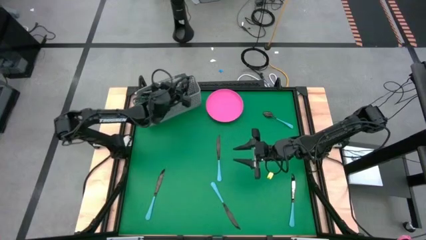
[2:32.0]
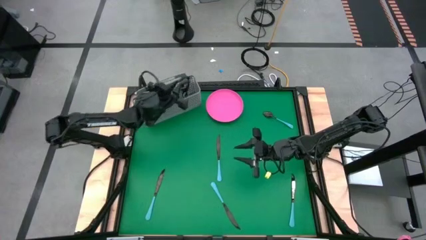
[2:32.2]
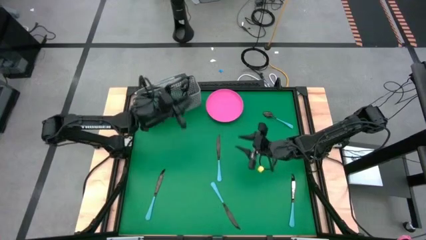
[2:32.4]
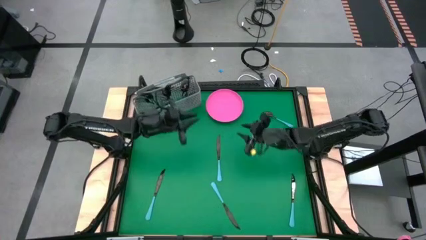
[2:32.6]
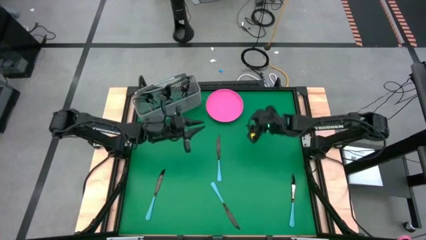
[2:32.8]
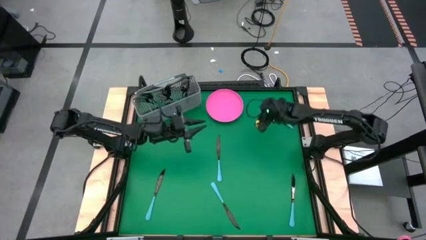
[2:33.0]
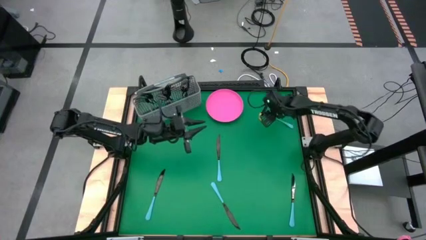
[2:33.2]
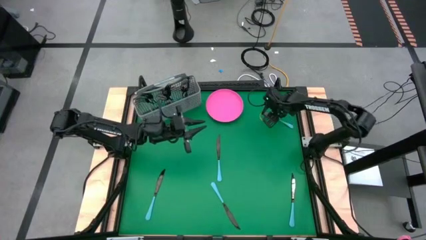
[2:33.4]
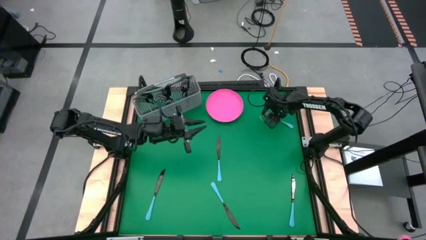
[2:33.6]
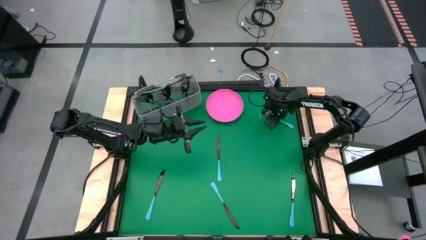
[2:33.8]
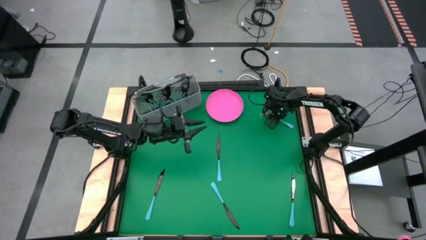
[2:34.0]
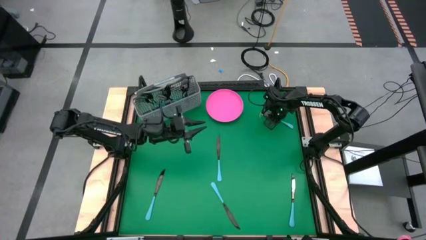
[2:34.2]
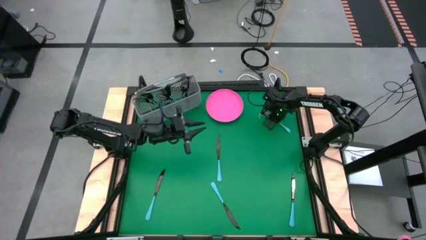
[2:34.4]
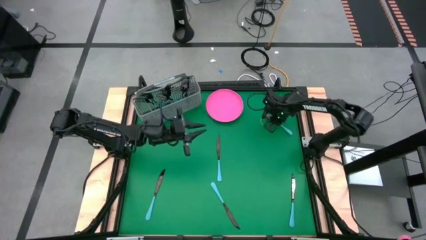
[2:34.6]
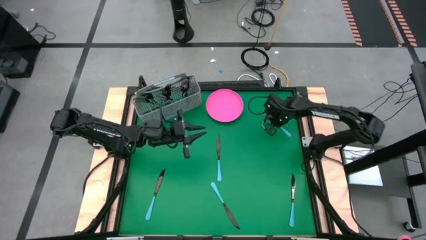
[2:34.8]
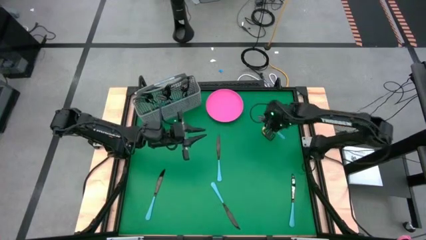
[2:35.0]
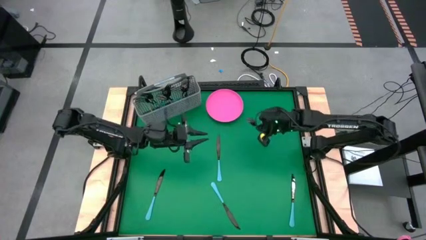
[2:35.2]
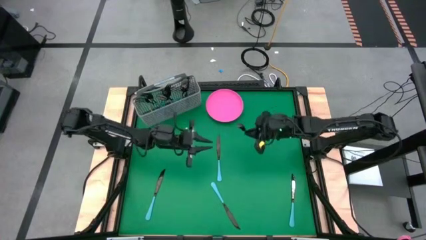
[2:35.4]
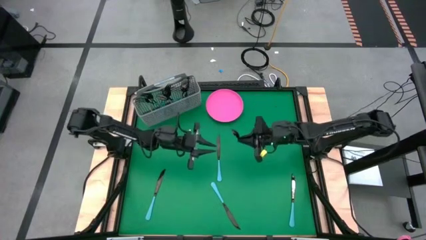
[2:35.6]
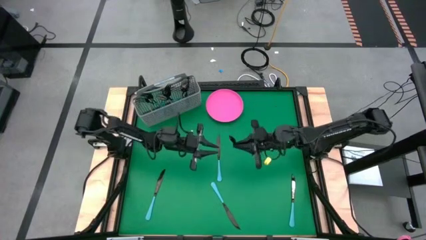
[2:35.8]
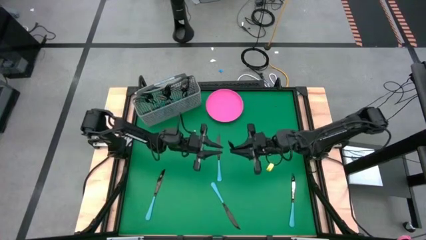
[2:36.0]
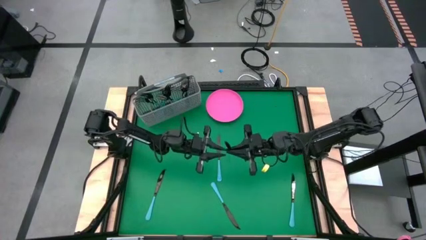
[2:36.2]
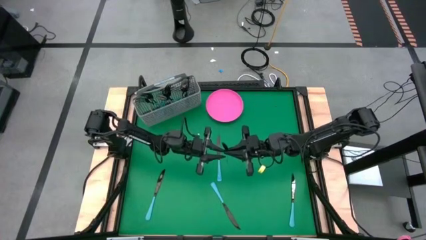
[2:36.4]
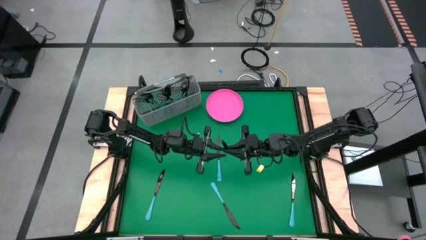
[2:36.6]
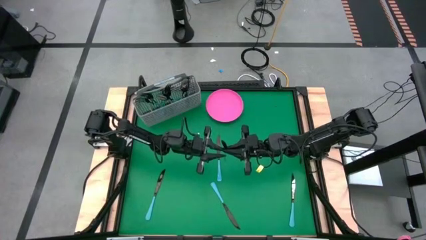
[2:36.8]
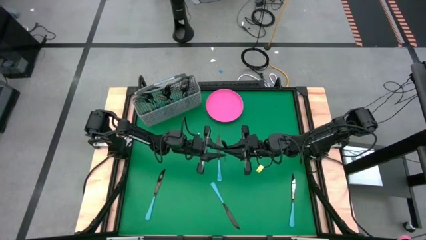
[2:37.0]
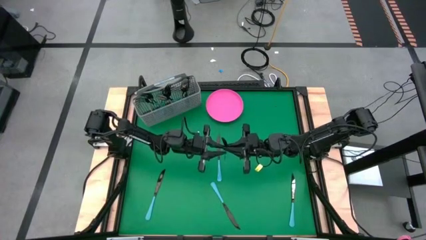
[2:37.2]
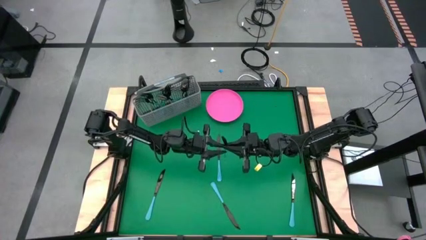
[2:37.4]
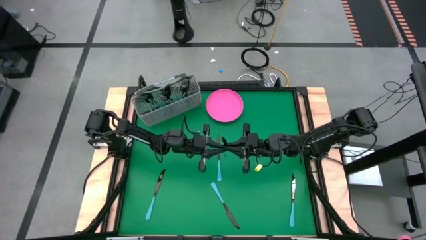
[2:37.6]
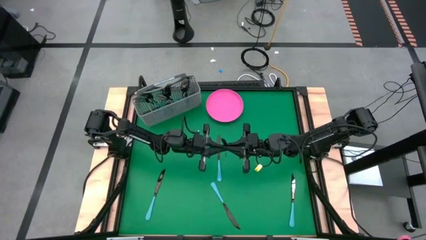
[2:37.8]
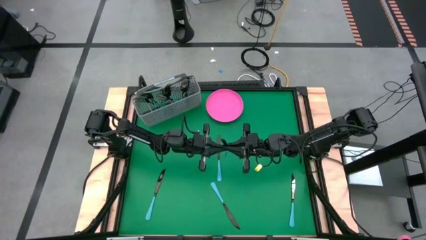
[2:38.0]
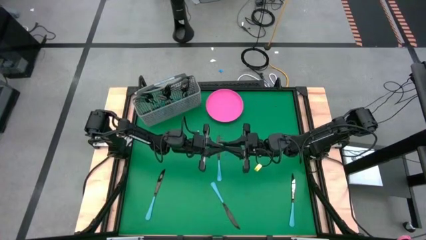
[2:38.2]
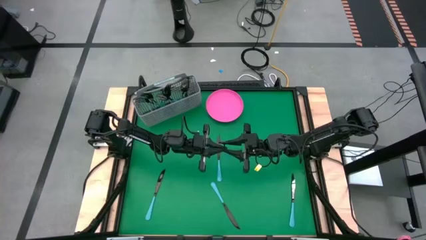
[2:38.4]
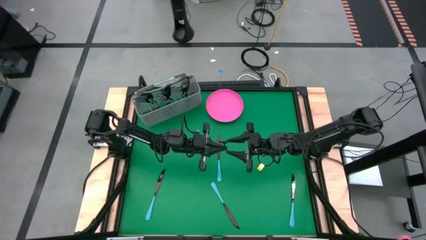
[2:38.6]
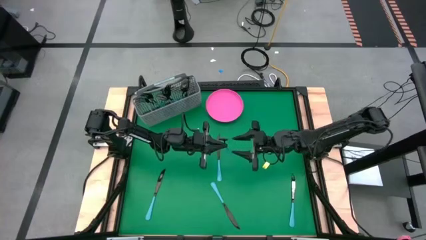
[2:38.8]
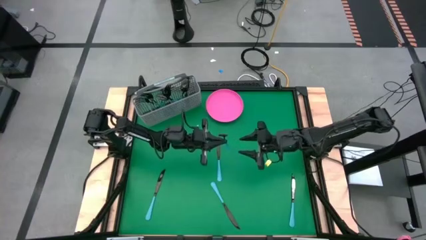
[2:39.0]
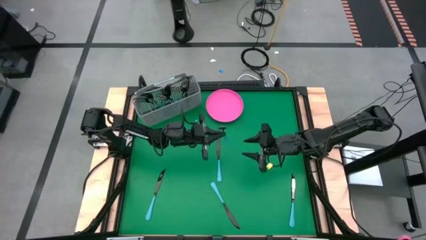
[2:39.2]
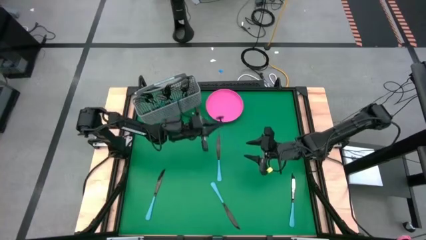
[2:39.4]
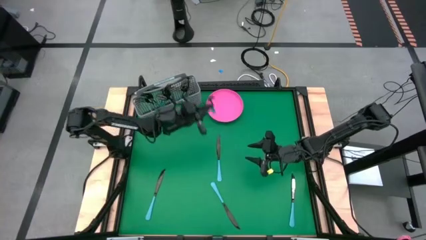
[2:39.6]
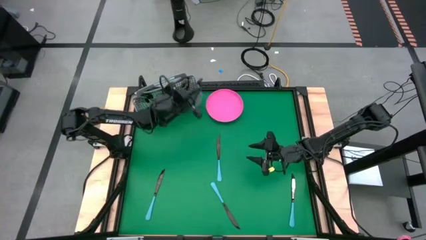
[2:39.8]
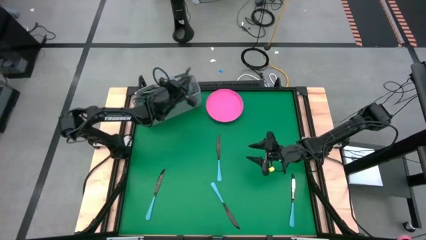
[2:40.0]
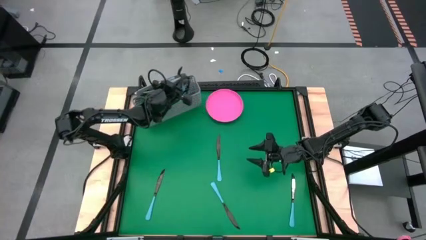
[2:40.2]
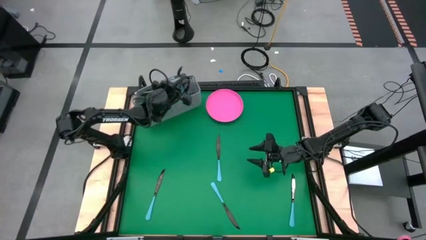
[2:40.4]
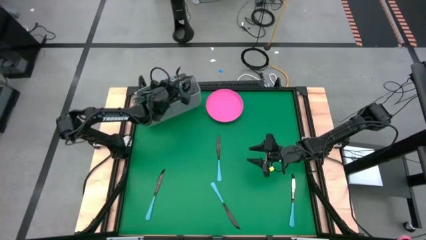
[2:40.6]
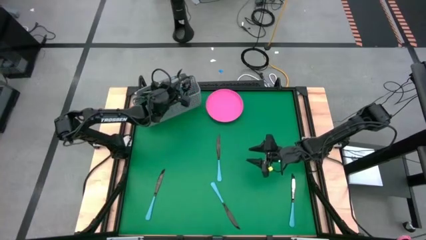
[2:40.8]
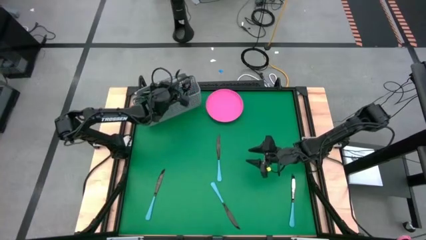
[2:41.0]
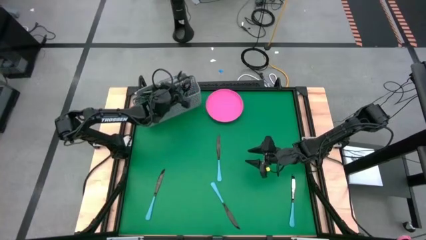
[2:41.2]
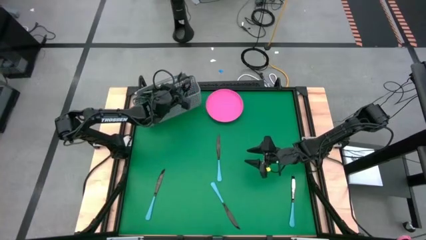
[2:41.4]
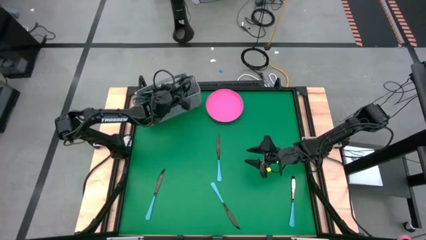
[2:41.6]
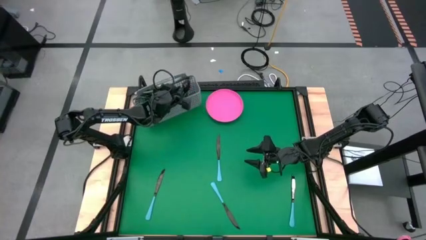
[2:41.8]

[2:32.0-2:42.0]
Task: Sort silverware
Put the blue spoon into the gray silverware holder

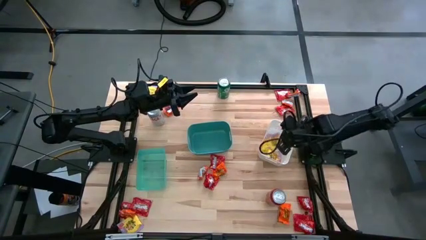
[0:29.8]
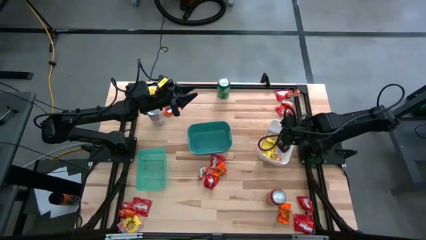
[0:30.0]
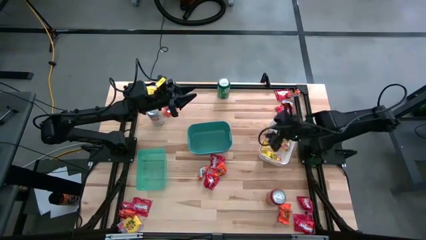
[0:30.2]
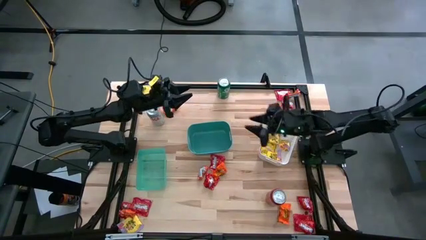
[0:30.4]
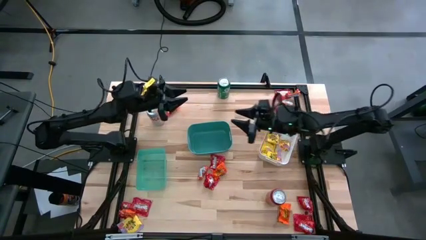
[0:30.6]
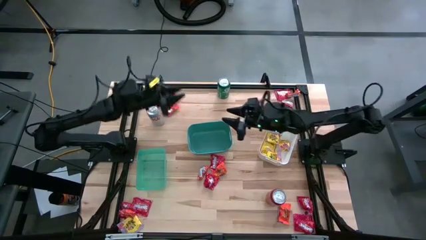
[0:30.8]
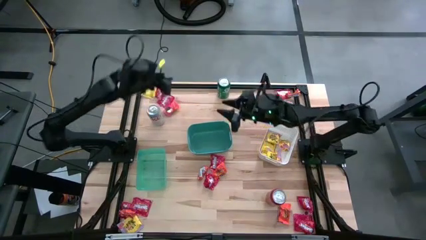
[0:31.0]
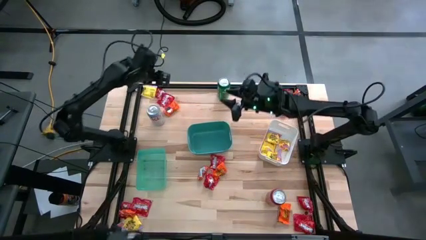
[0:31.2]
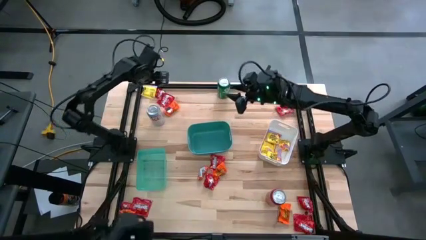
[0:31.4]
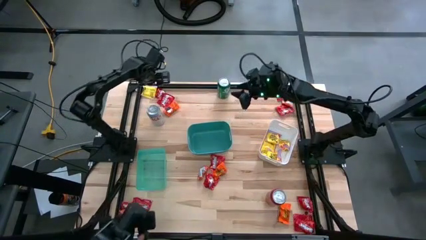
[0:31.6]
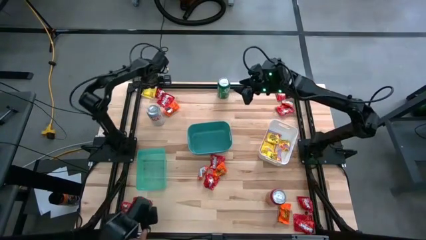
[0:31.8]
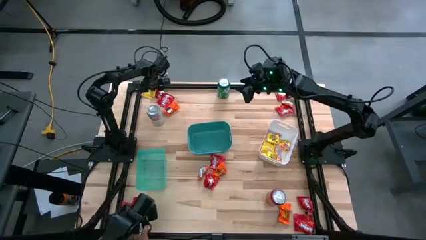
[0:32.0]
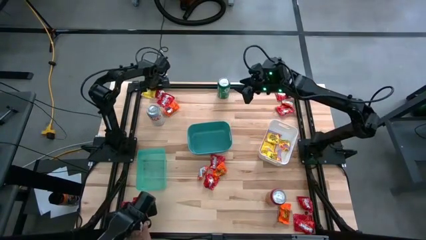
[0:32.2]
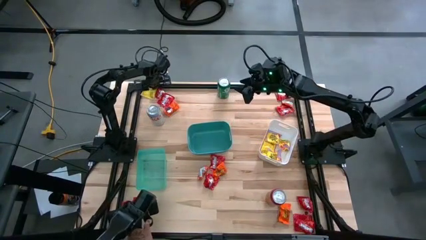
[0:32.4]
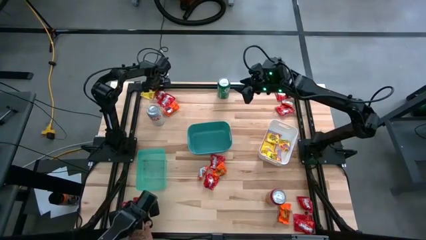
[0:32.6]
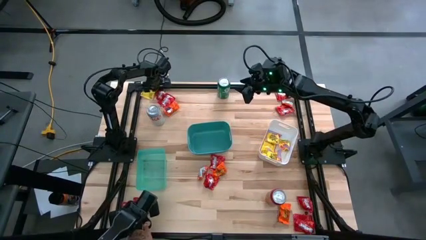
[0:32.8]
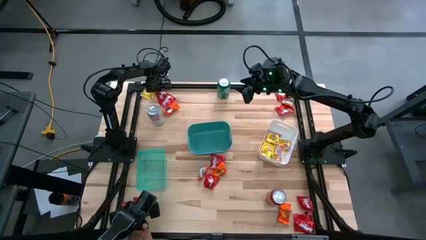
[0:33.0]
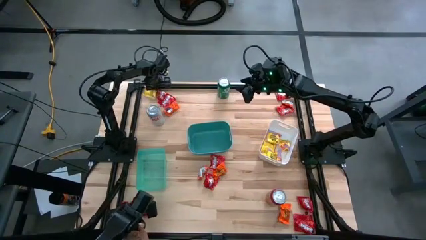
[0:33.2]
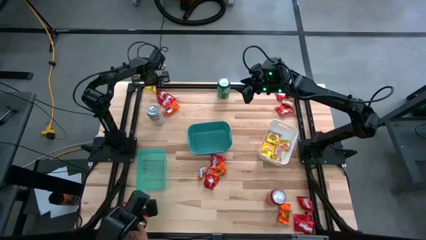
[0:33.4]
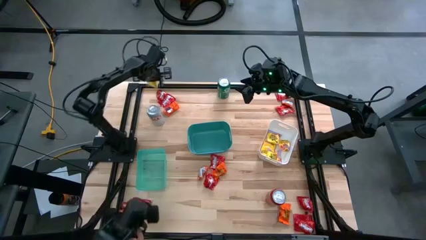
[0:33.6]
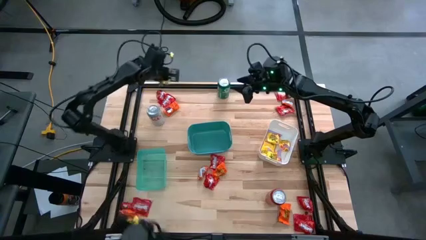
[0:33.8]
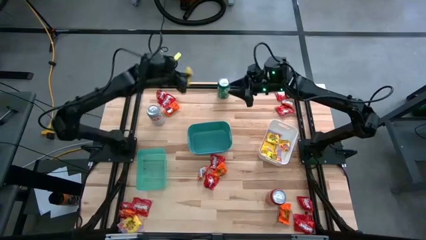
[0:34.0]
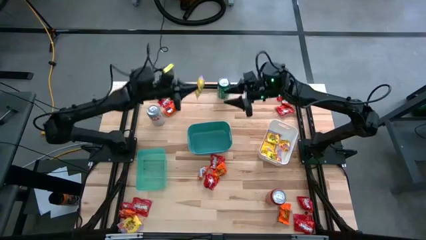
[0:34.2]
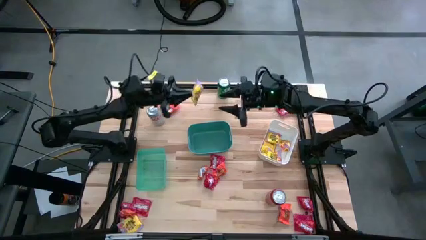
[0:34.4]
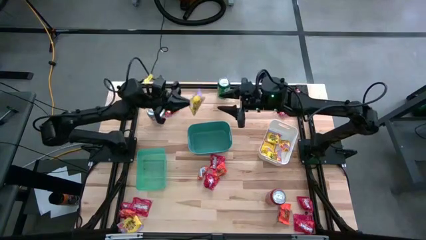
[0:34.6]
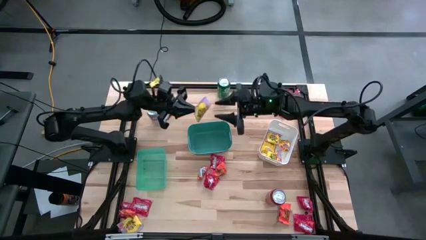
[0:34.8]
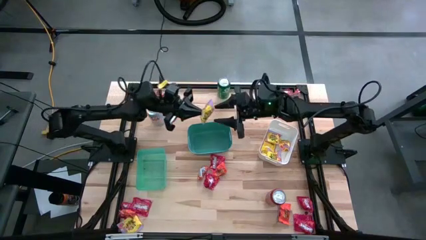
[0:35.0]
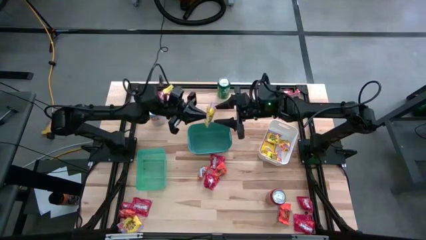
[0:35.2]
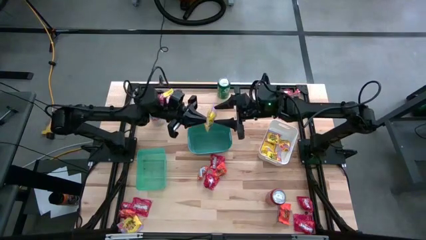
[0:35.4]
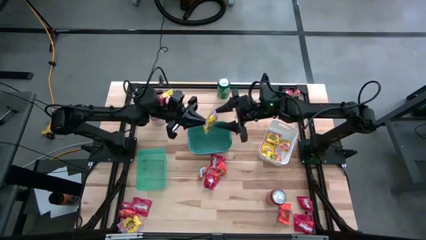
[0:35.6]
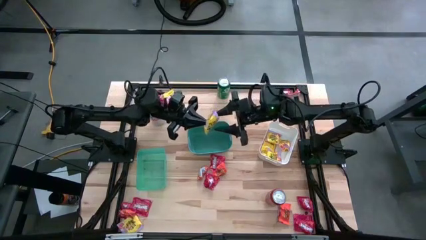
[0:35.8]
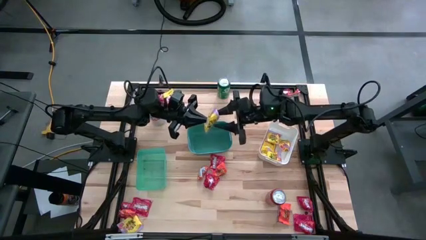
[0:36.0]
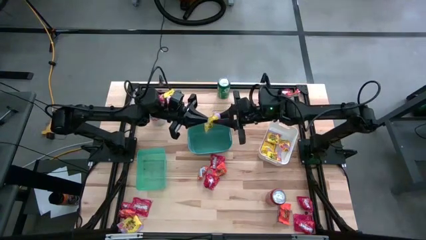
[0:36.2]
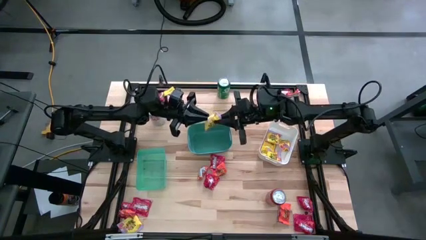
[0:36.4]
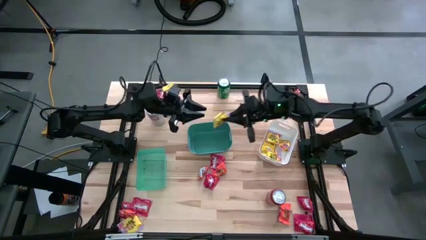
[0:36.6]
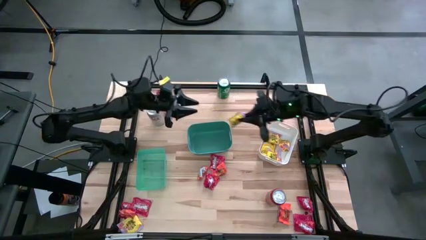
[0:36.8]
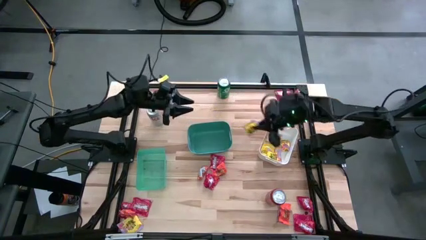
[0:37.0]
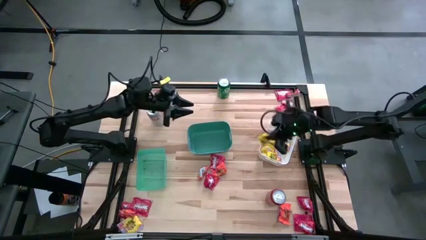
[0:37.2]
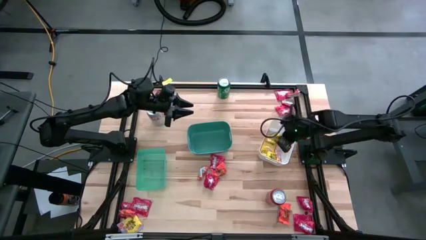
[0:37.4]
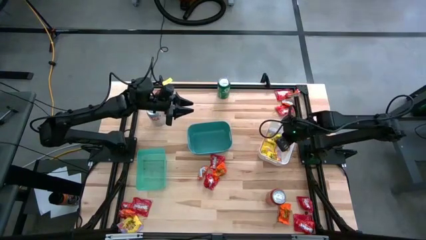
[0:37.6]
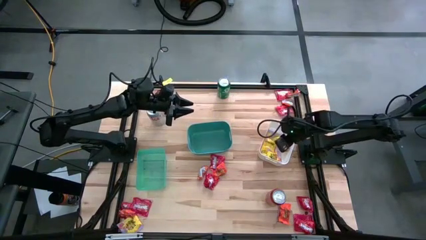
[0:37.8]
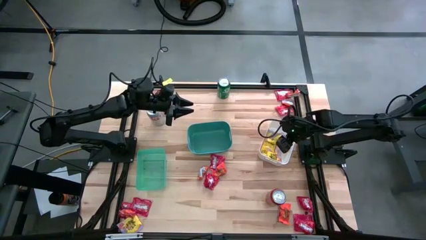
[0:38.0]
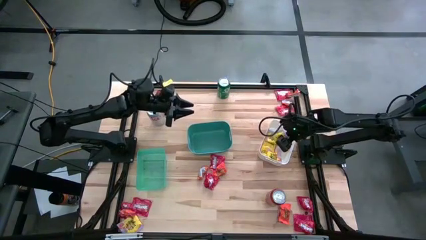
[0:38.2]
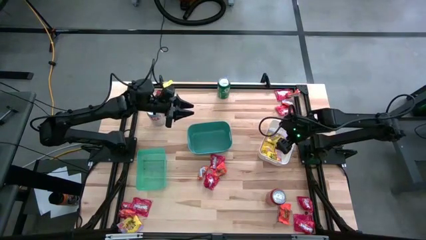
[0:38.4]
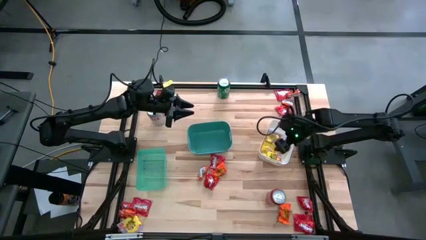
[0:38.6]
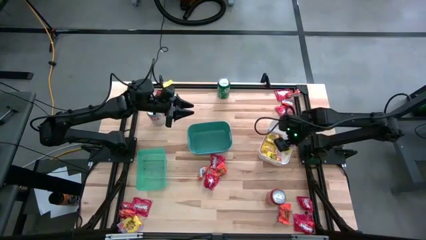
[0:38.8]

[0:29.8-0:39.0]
Task: Sort candy
Put the yellow candy into the white bin
